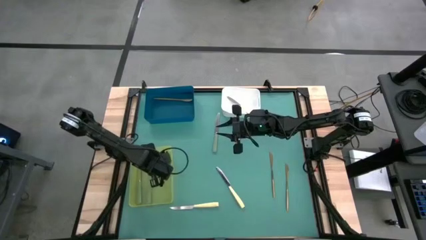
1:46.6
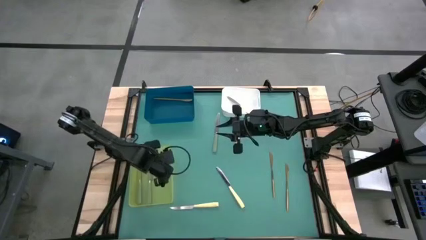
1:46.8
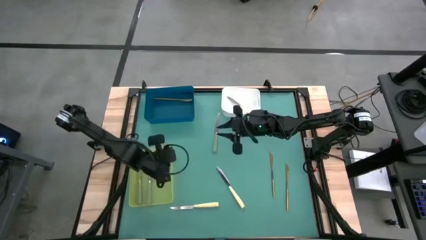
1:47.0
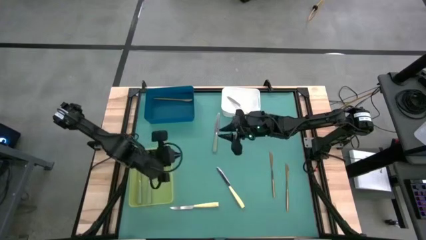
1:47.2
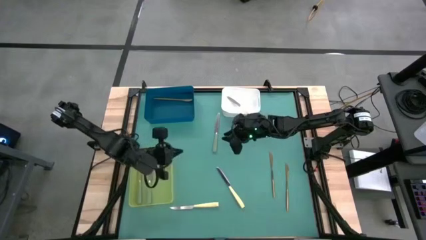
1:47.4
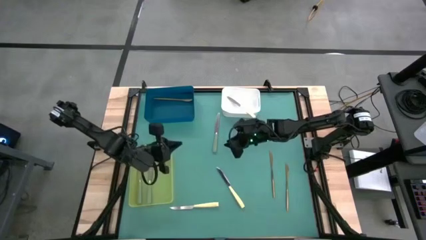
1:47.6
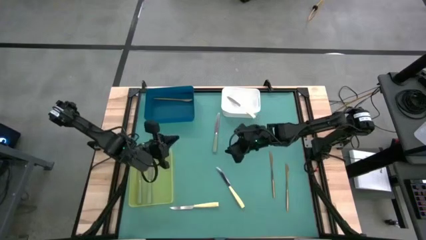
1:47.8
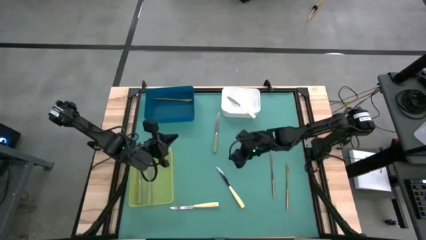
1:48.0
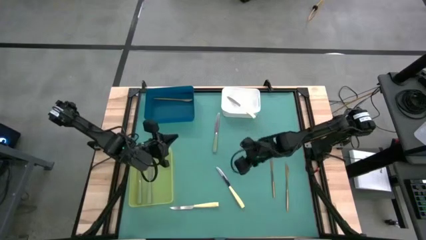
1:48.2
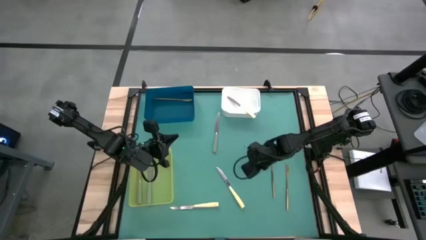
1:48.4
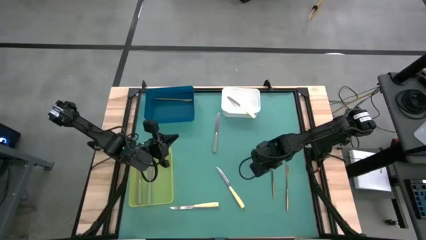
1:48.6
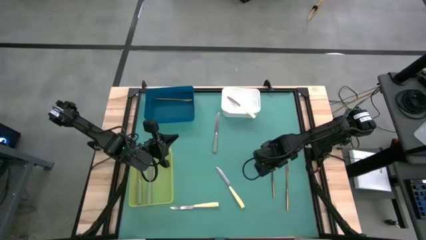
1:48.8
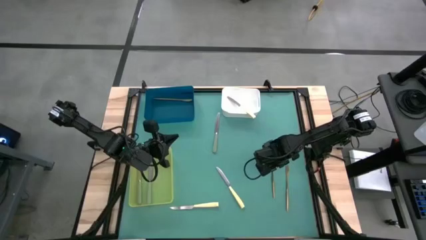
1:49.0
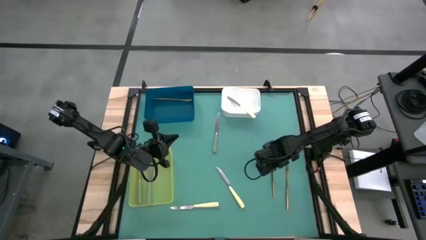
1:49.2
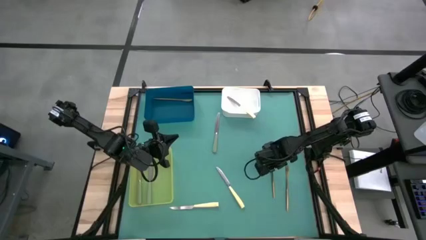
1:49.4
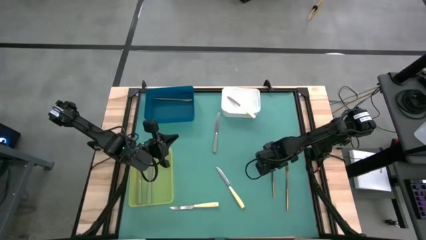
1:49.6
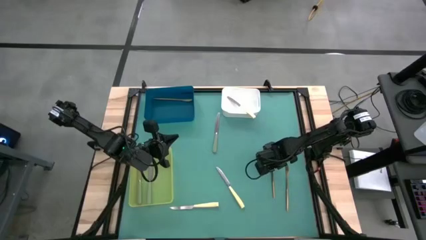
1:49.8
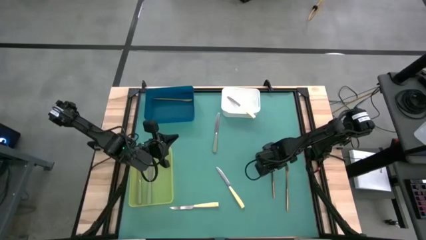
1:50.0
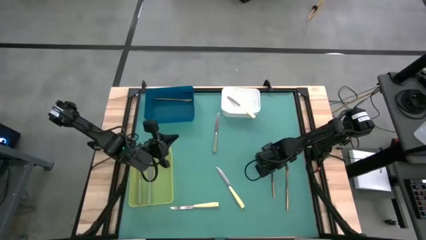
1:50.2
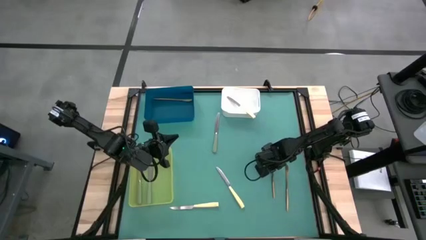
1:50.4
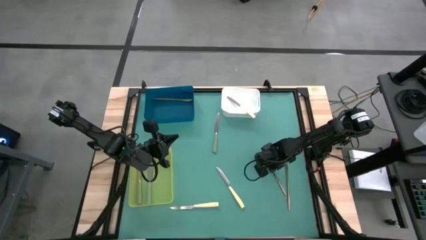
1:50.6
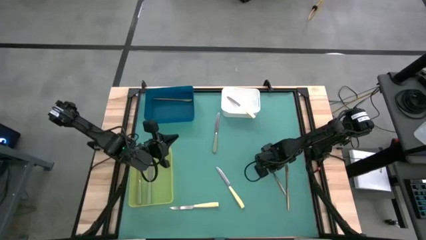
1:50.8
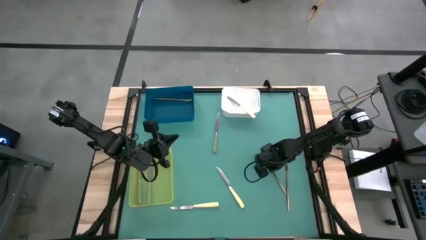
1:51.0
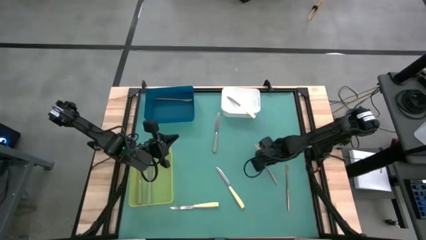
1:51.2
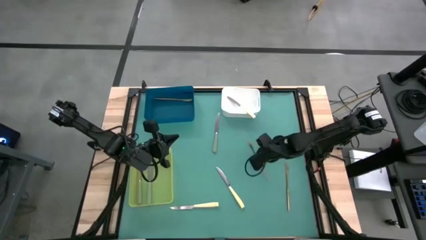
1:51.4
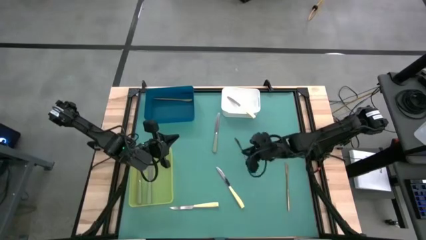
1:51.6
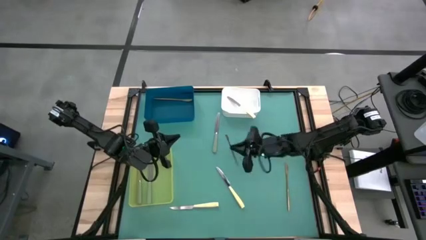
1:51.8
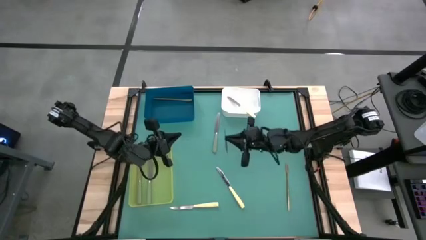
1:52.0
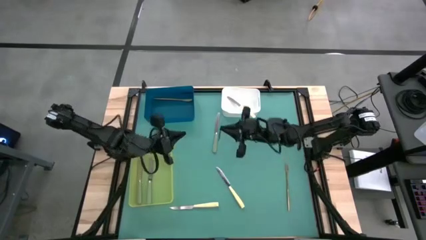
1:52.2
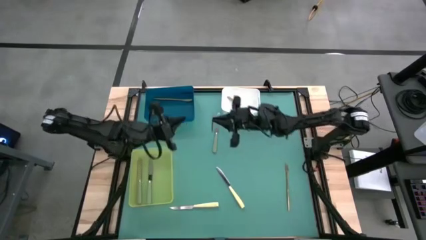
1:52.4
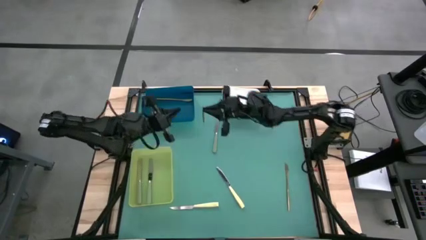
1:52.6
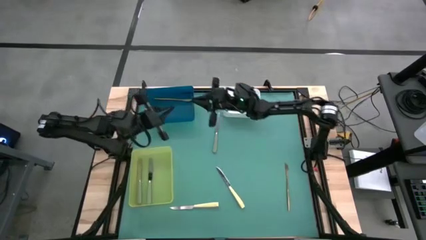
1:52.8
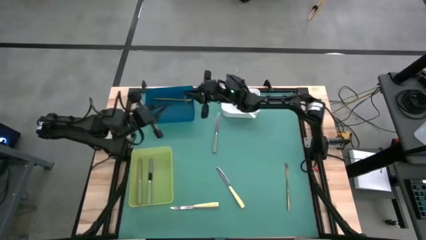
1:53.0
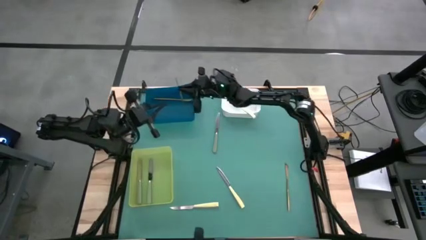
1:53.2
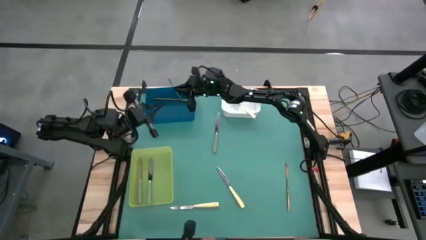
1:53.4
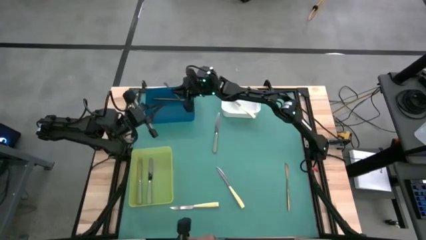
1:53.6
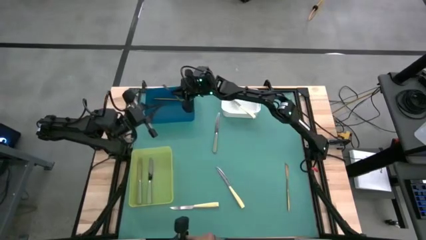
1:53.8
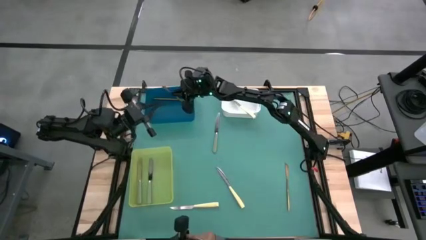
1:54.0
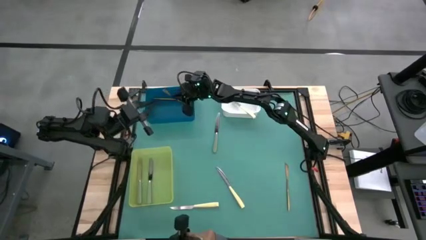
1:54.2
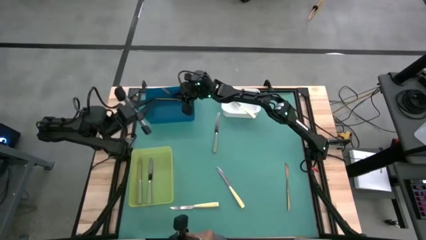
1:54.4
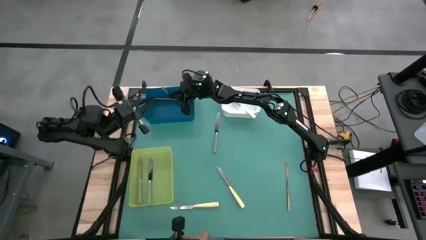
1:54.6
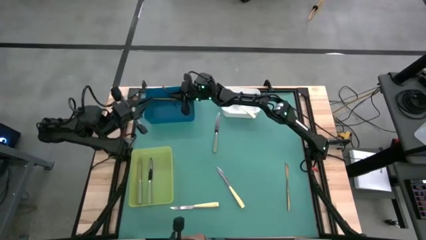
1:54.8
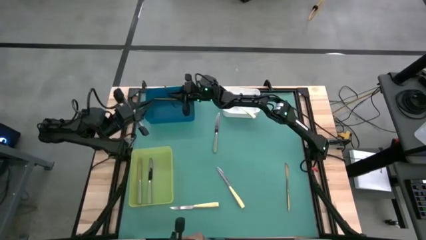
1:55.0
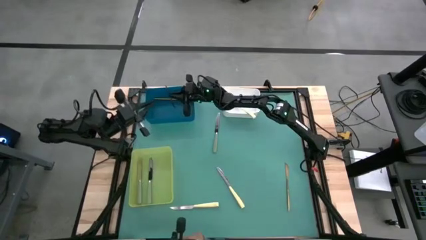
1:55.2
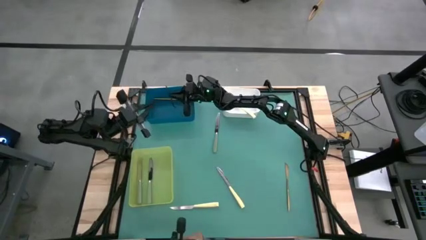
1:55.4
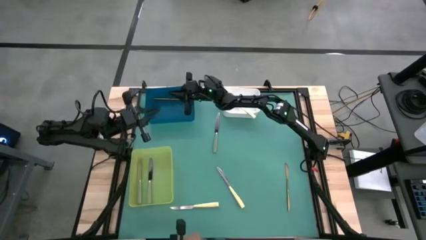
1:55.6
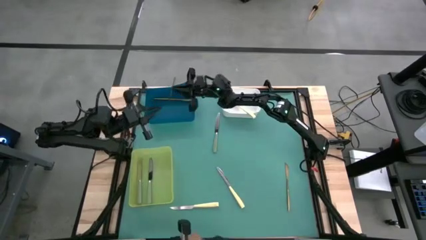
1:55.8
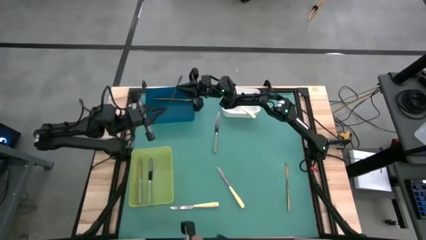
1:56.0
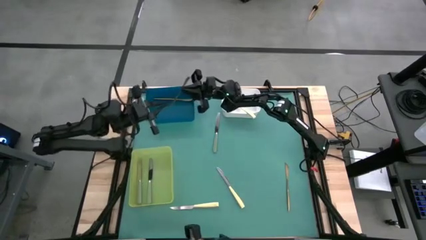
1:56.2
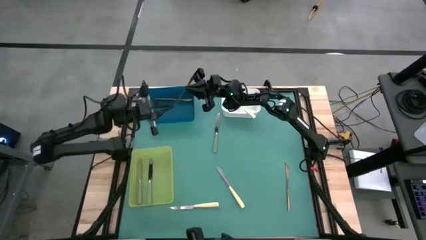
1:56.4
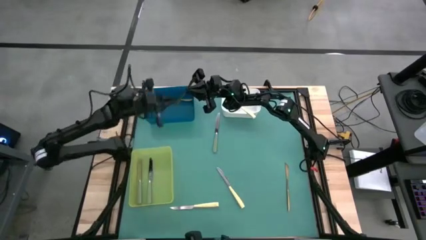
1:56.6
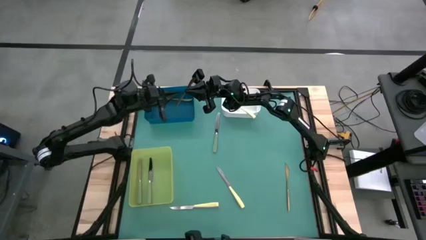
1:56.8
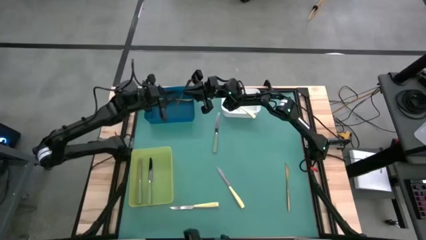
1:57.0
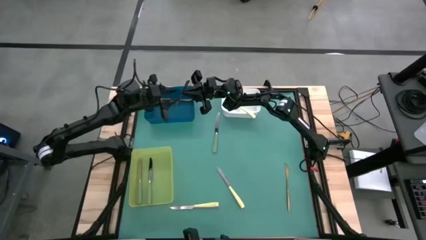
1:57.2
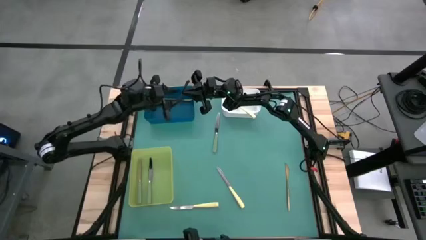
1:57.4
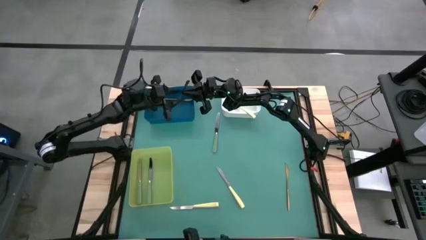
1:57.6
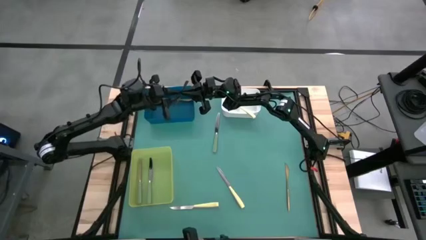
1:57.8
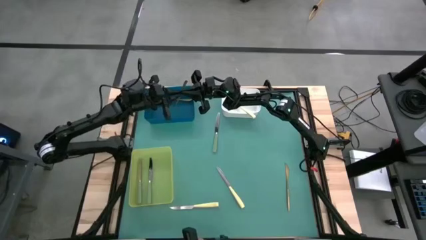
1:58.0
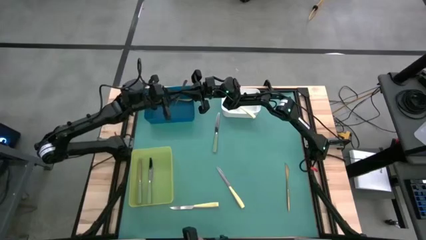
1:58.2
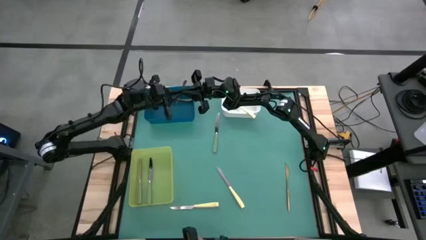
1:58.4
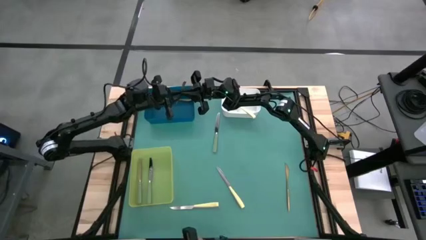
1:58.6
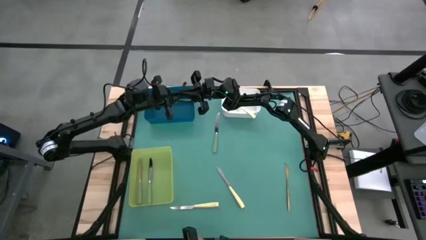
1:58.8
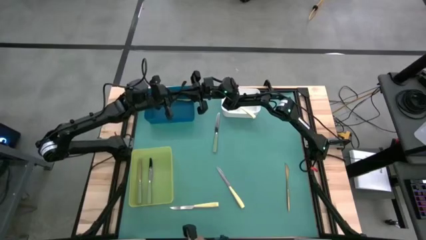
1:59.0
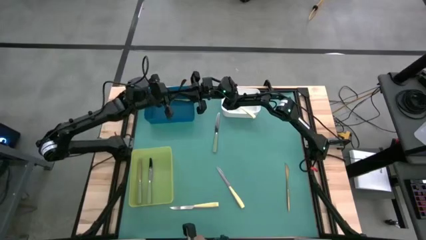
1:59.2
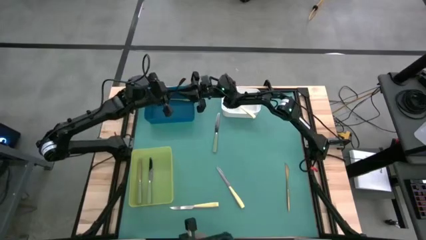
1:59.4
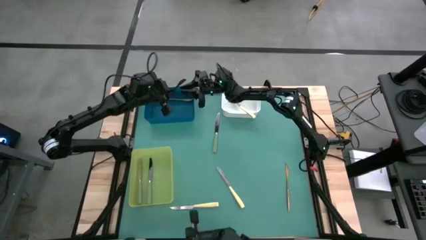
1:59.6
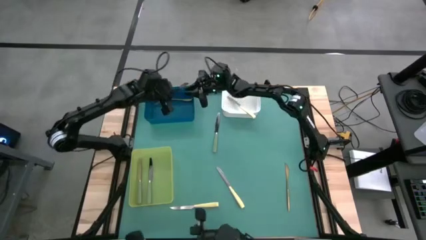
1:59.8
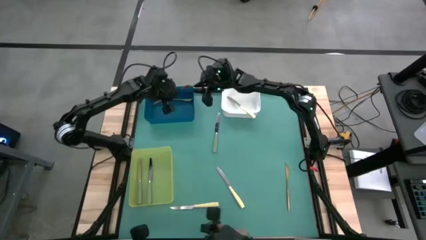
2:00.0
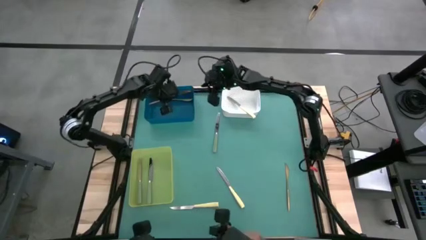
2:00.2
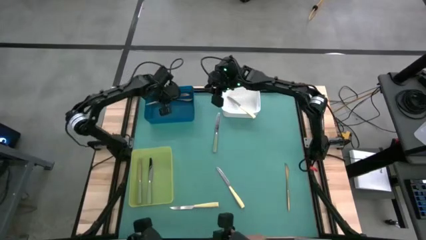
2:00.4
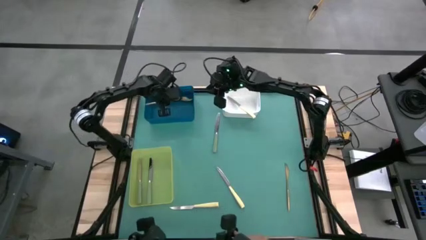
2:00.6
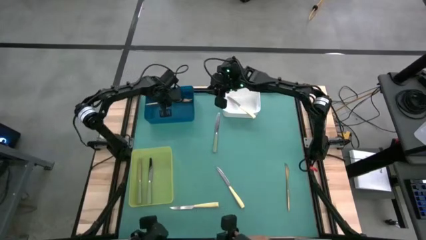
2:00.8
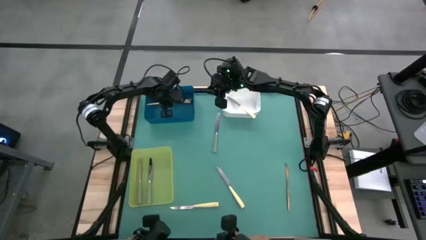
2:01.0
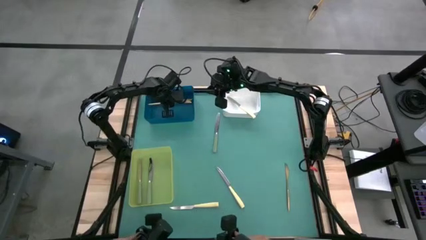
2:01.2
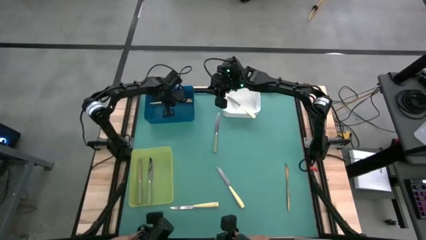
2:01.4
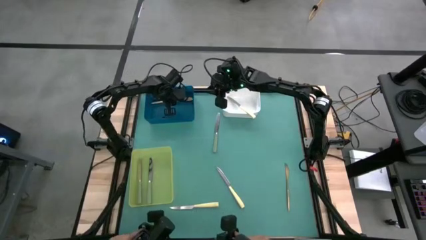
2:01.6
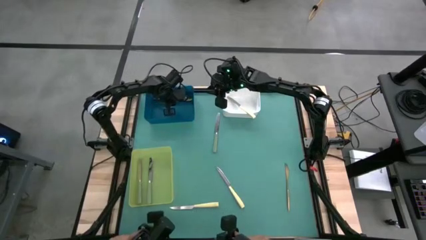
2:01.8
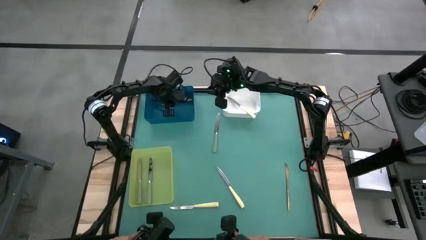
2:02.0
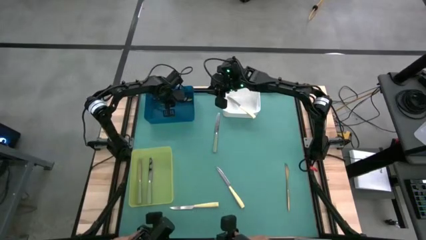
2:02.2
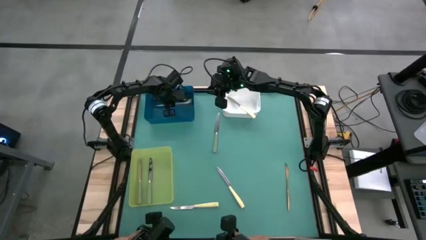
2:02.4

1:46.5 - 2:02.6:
Task: Sort silverware by color (type)
Put the left gold knife into the blue bin

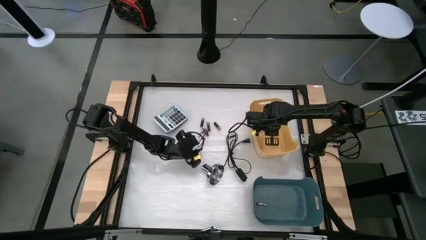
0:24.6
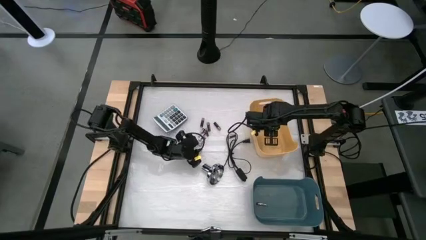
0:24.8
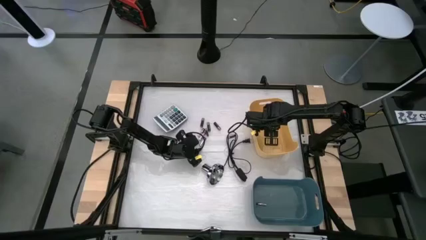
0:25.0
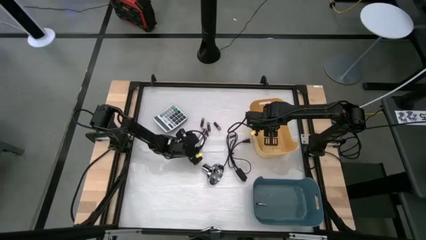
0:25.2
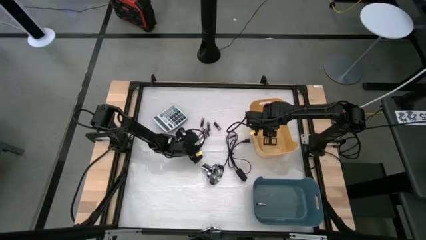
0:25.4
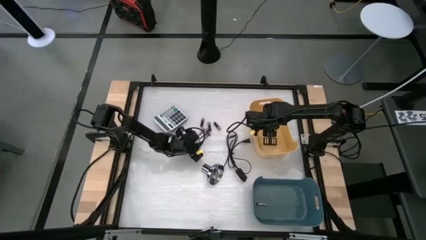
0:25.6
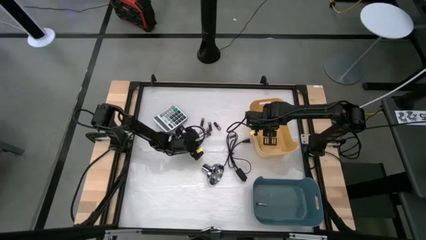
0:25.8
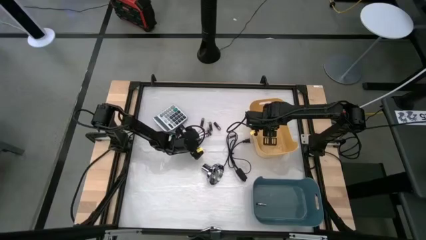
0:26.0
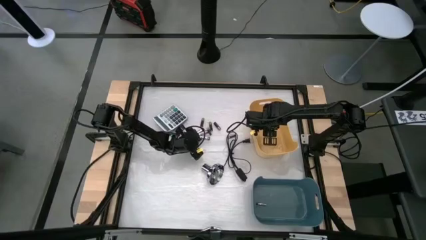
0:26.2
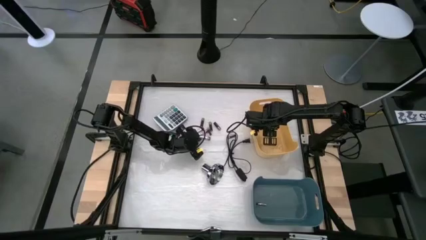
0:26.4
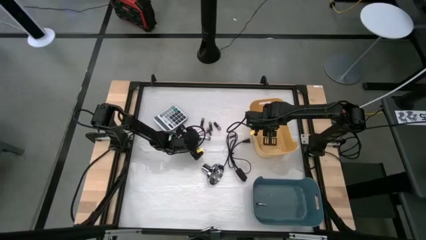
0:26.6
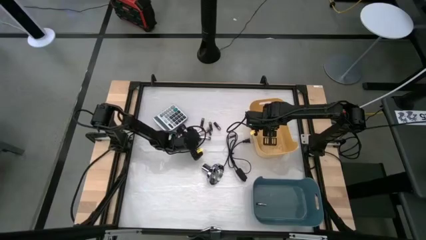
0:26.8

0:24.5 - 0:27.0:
Task: Sort batteries
Put the white battery into the blue bin
